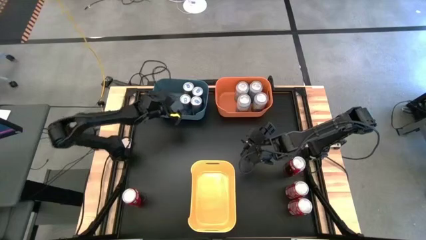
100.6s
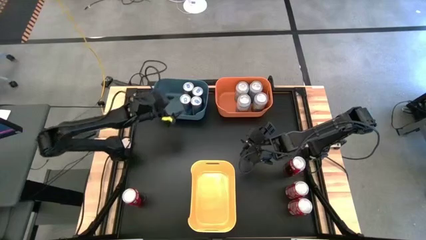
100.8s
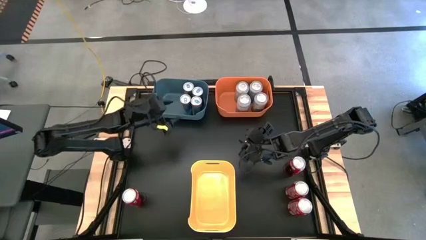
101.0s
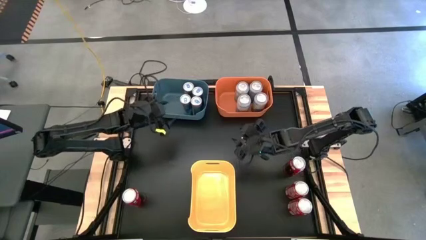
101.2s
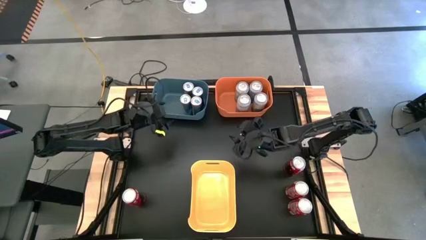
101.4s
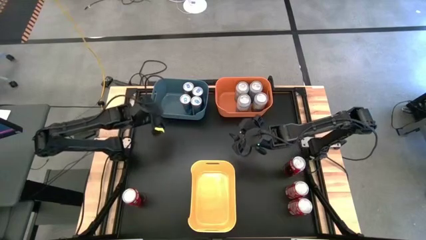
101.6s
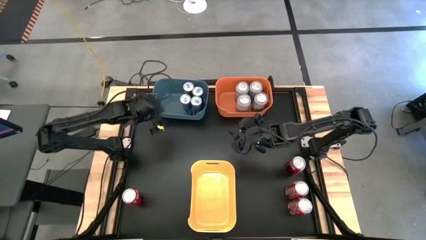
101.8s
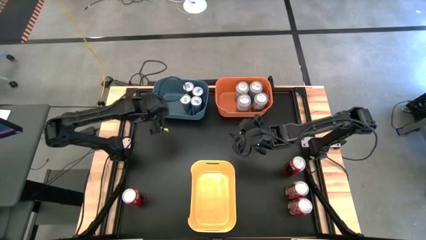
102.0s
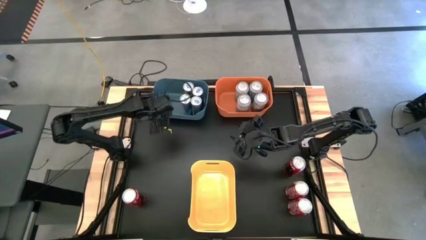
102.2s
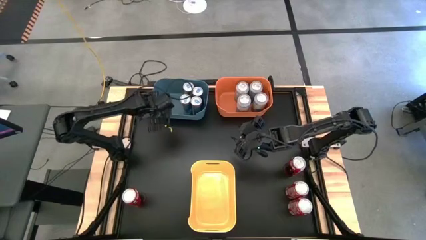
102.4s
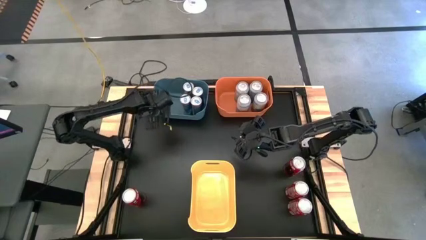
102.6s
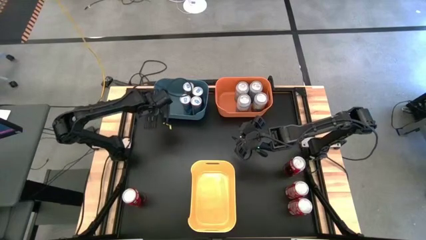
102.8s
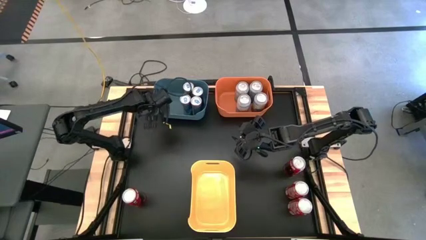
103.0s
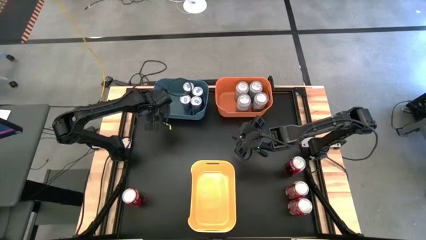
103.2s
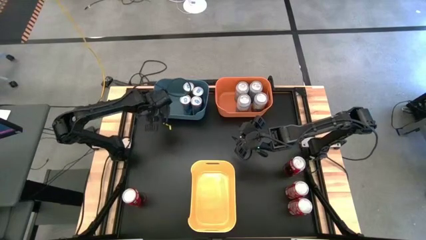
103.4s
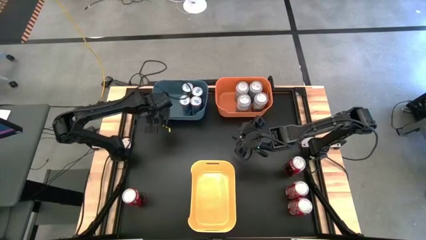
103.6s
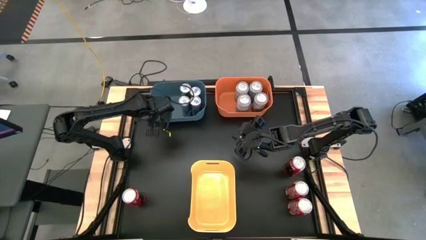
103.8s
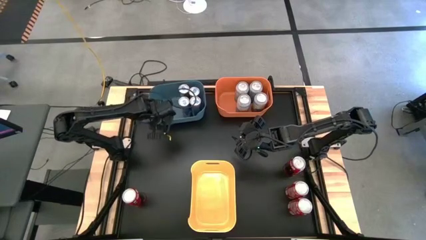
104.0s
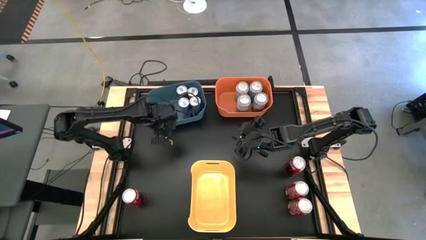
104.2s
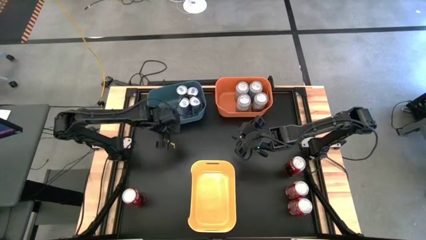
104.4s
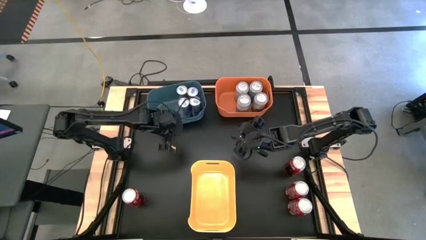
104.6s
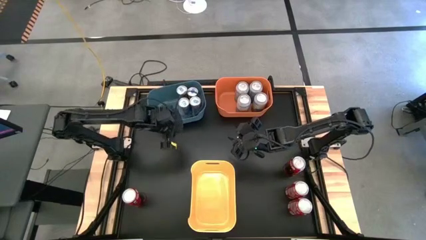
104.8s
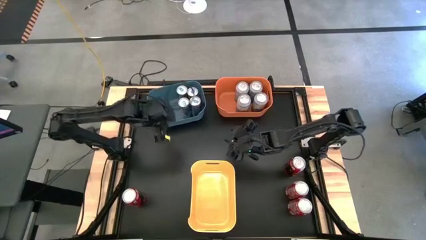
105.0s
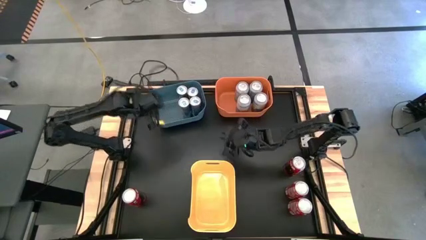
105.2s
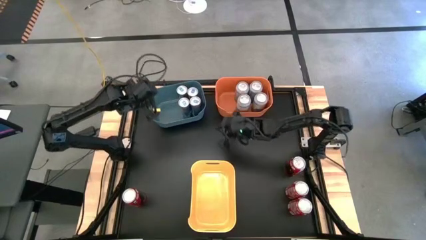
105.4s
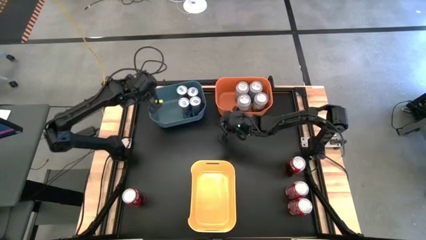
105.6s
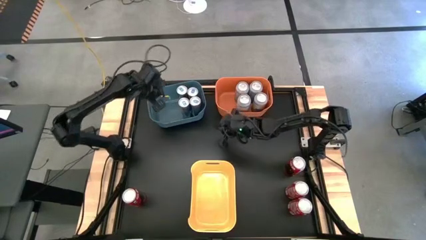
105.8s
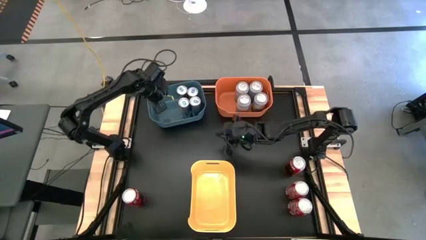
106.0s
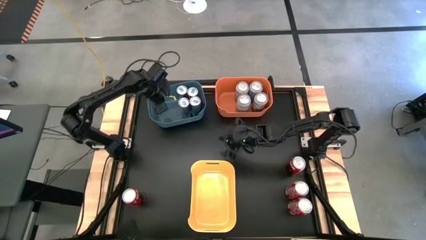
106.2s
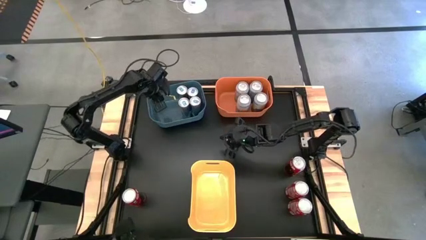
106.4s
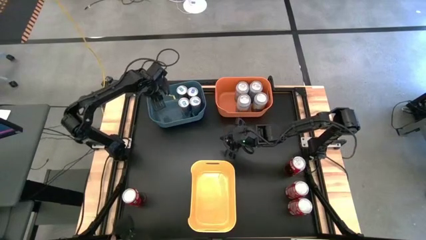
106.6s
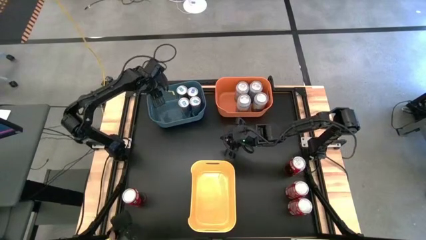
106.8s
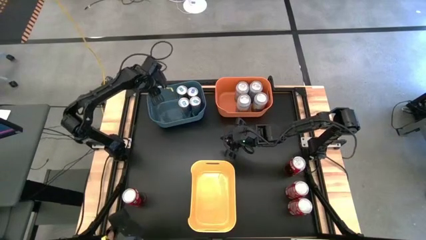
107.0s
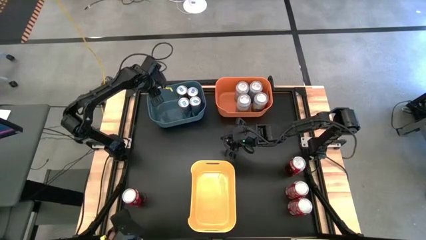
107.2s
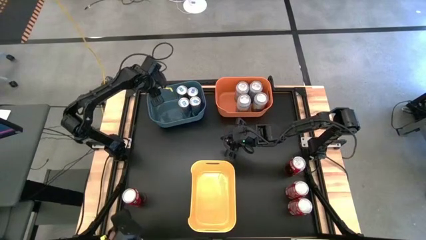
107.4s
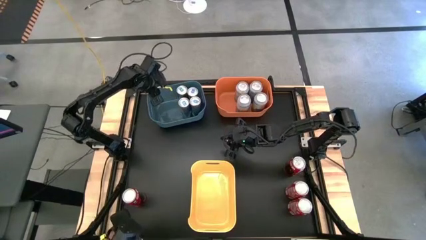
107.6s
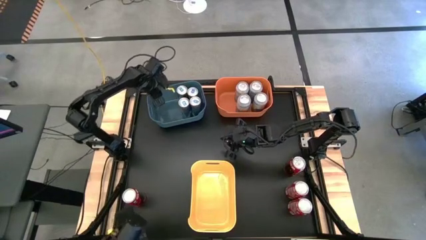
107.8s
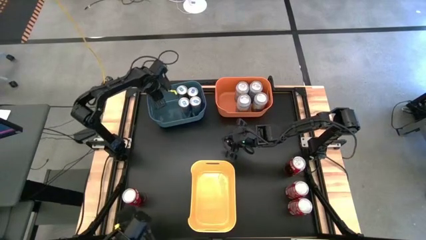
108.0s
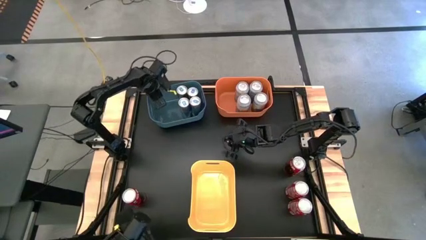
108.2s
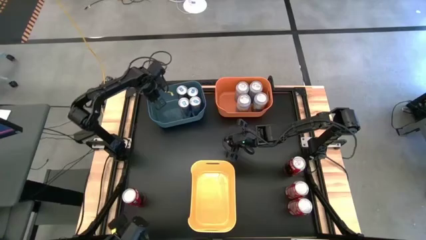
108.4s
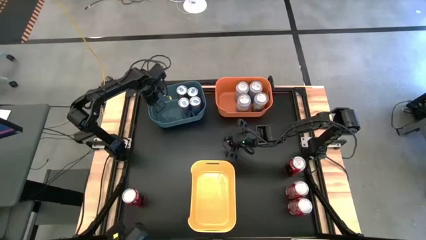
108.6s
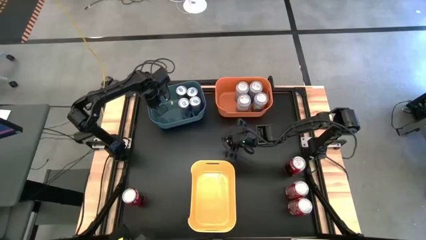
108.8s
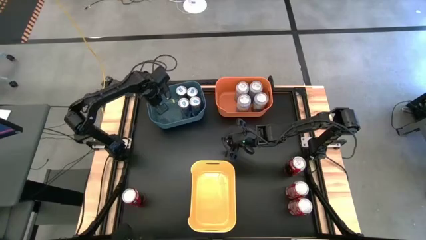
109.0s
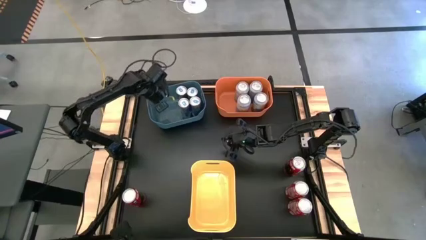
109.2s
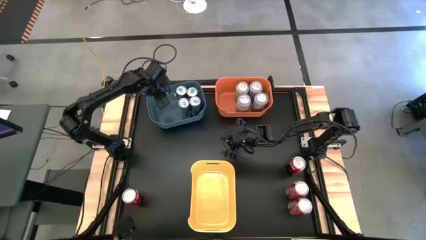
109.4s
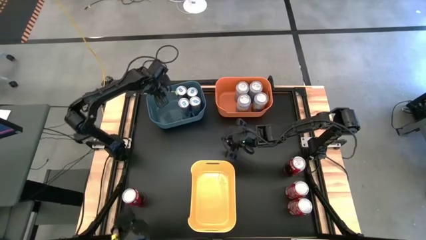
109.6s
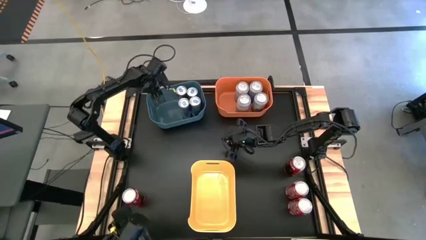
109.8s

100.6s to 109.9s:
Task: Sort soda cans
Adjust the blue bin

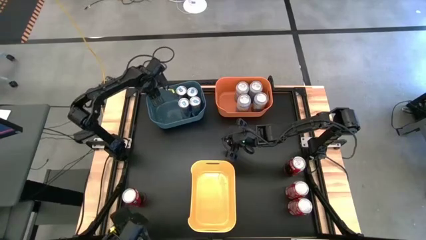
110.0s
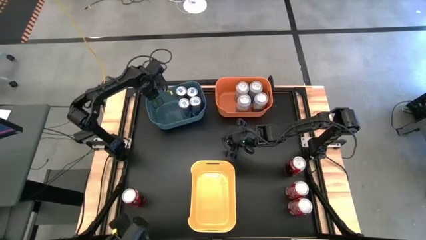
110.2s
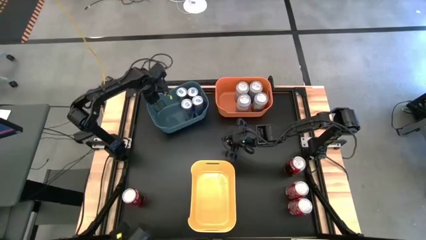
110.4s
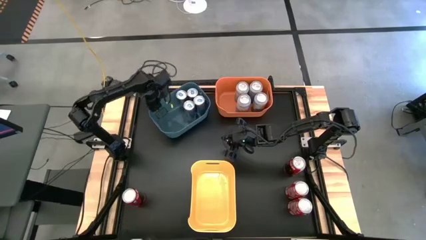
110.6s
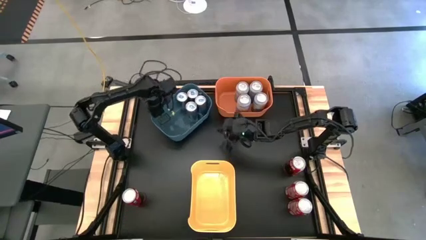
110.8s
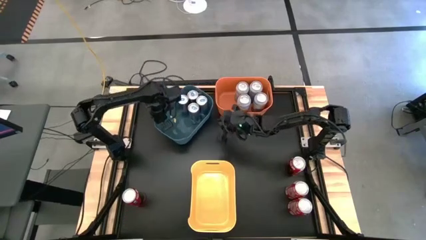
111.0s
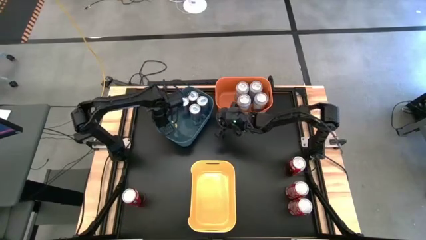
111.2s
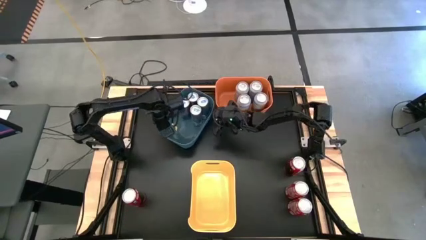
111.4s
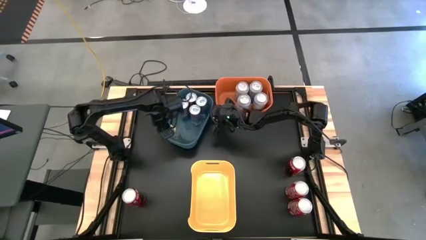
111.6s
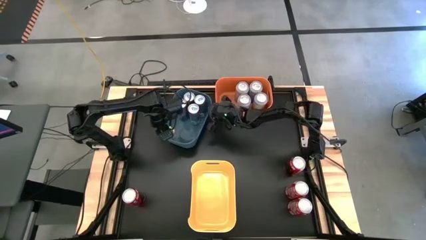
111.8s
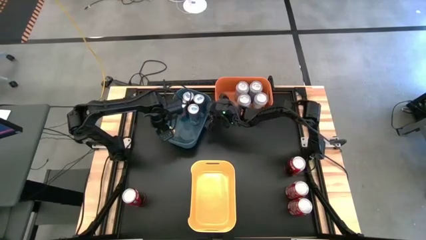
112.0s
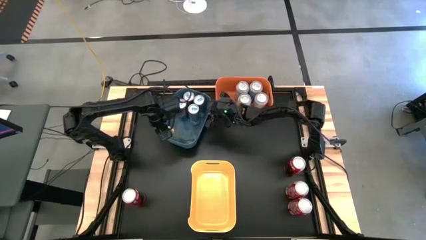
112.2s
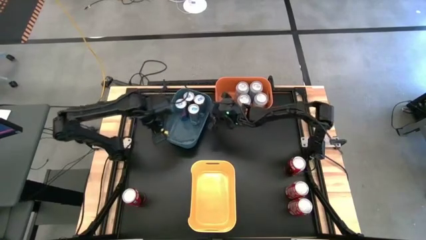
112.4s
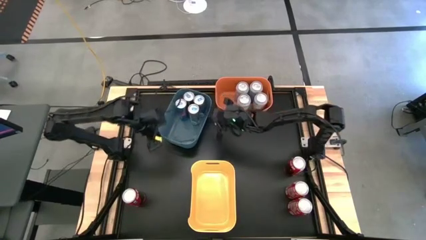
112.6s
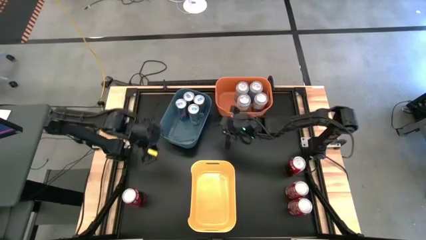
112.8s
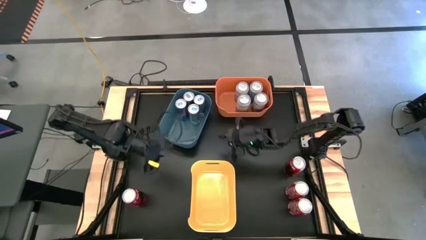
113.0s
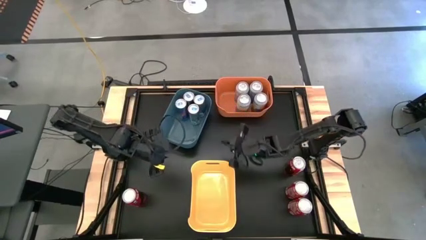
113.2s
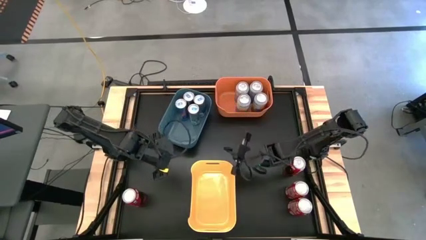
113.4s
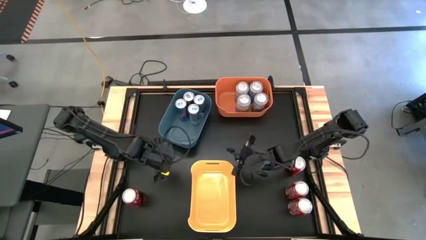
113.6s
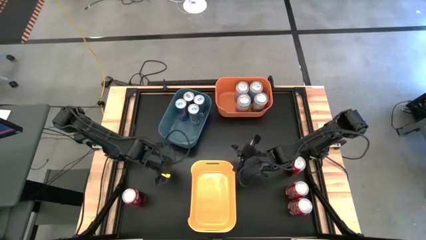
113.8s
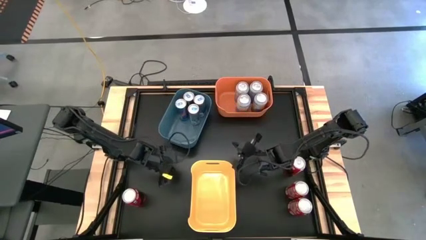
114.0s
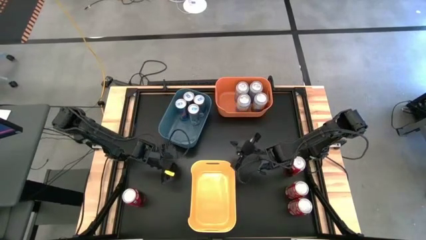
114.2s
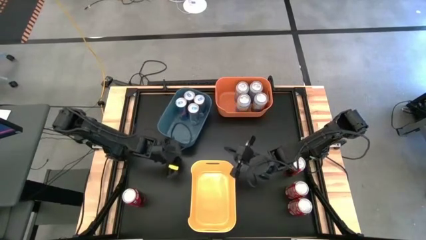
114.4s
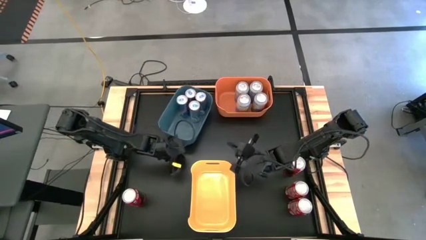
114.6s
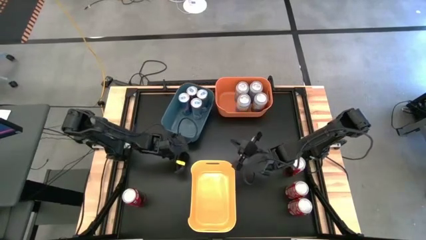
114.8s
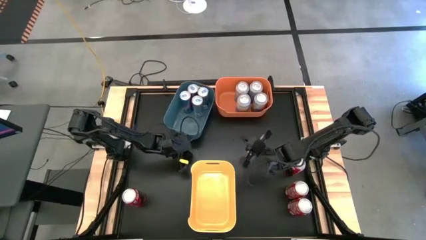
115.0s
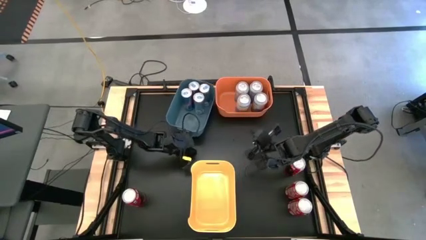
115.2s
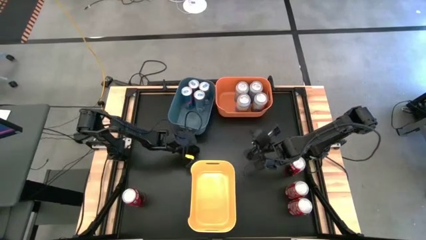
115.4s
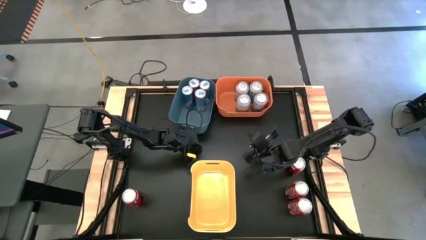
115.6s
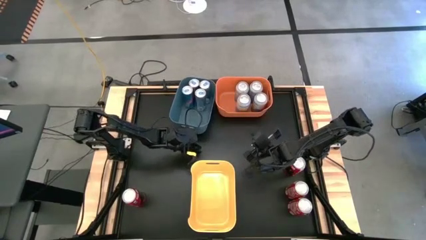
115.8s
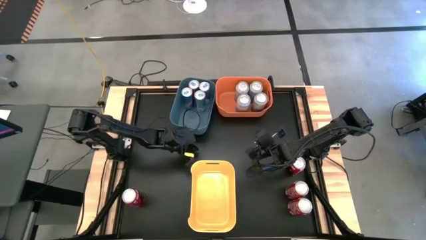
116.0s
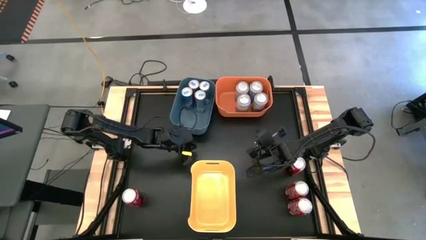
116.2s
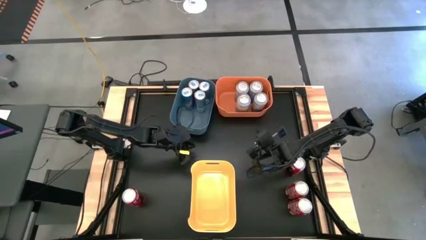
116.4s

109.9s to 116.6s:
Adjust the blue bin
